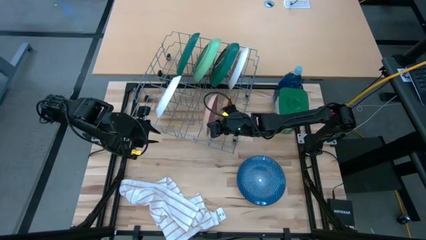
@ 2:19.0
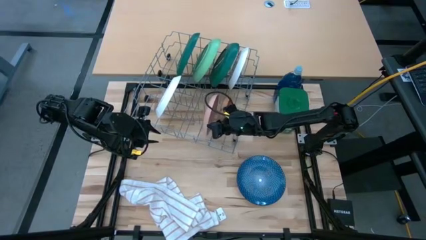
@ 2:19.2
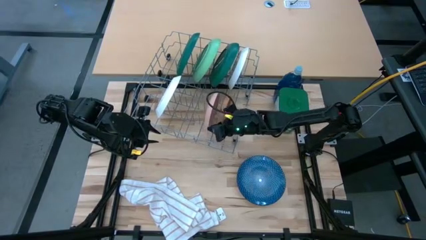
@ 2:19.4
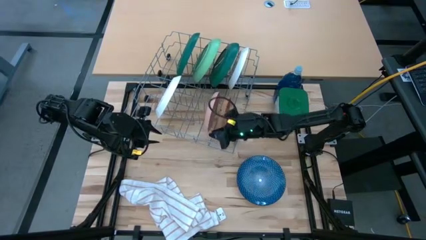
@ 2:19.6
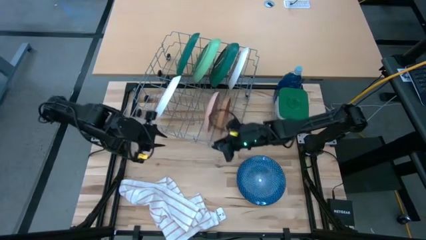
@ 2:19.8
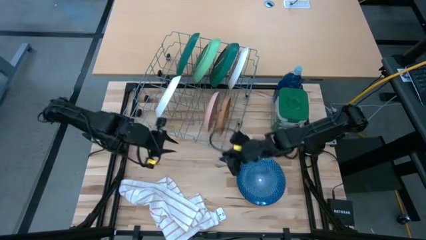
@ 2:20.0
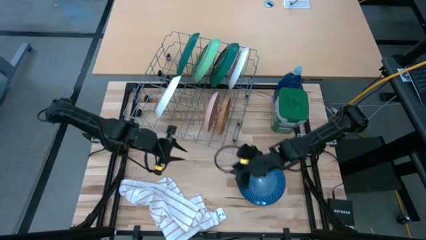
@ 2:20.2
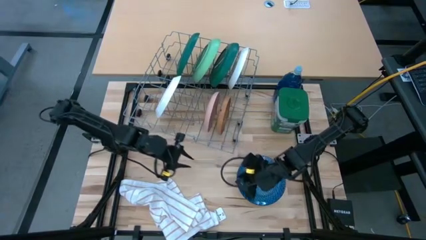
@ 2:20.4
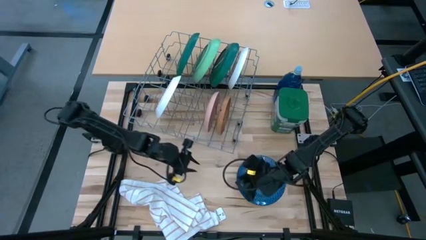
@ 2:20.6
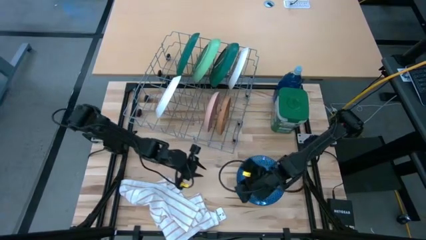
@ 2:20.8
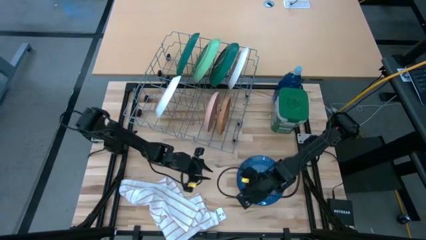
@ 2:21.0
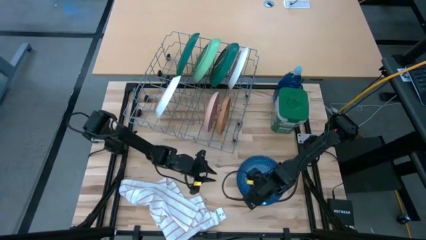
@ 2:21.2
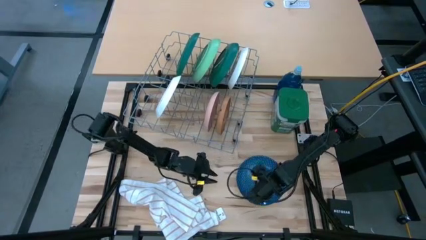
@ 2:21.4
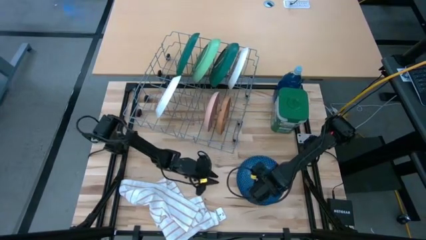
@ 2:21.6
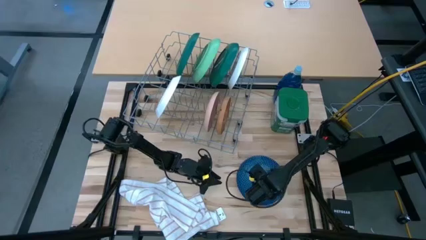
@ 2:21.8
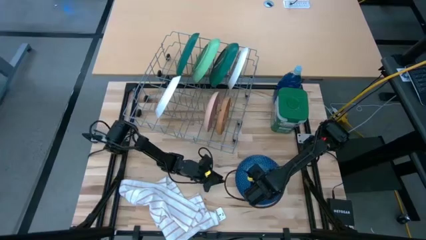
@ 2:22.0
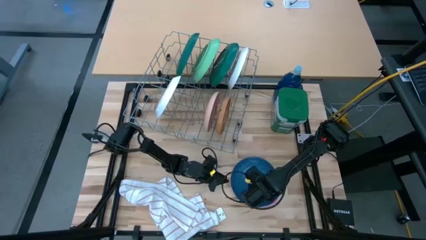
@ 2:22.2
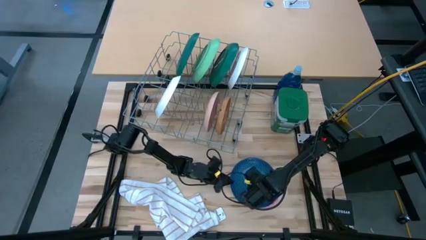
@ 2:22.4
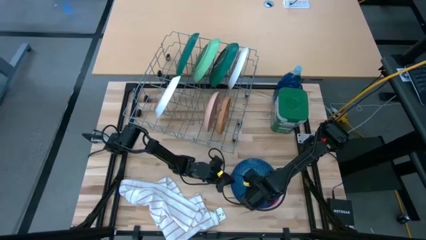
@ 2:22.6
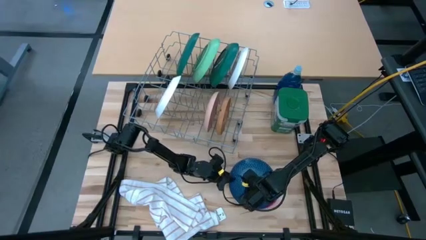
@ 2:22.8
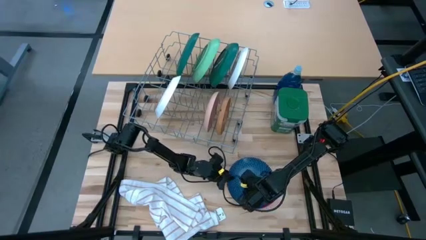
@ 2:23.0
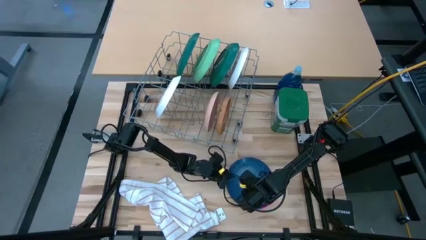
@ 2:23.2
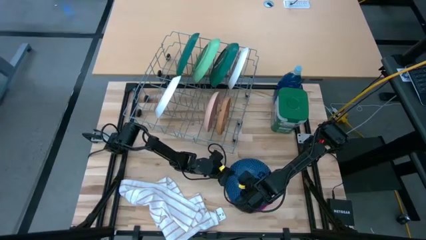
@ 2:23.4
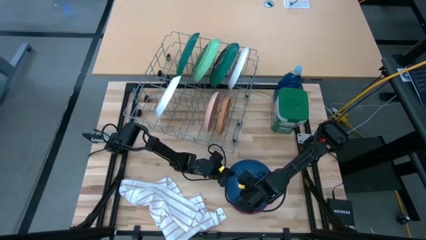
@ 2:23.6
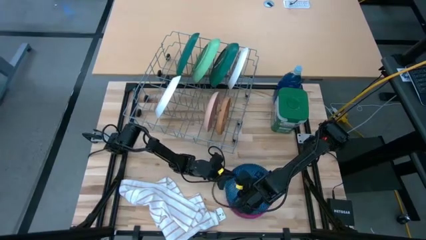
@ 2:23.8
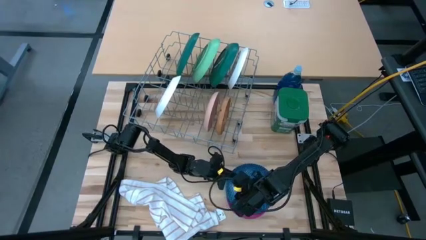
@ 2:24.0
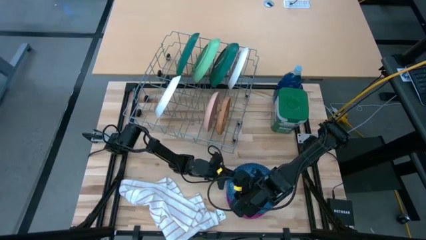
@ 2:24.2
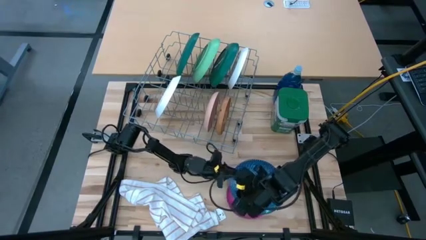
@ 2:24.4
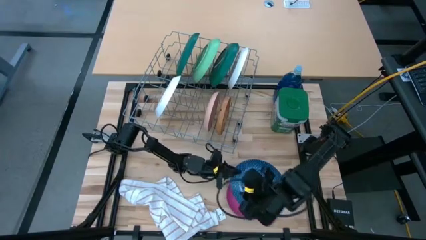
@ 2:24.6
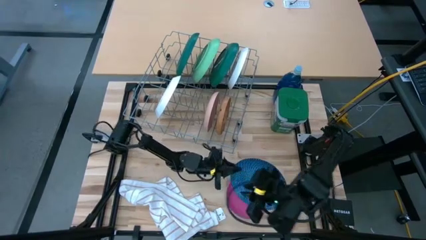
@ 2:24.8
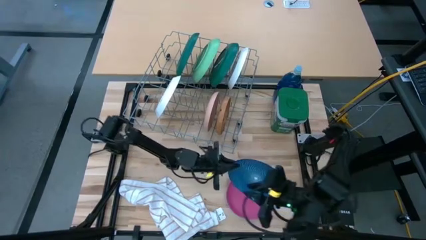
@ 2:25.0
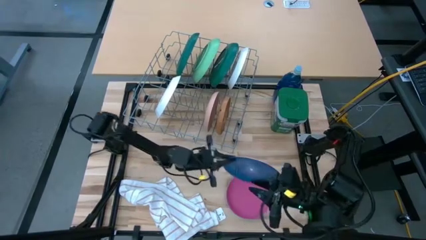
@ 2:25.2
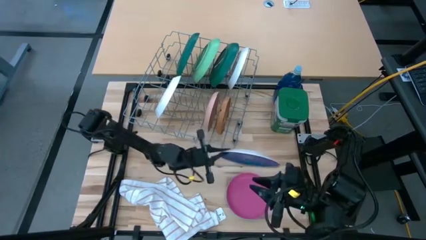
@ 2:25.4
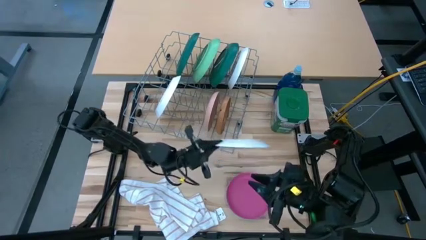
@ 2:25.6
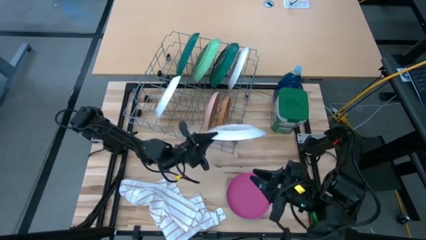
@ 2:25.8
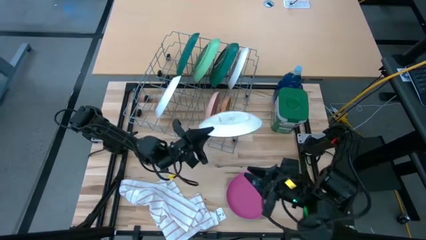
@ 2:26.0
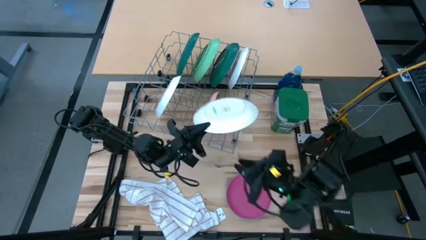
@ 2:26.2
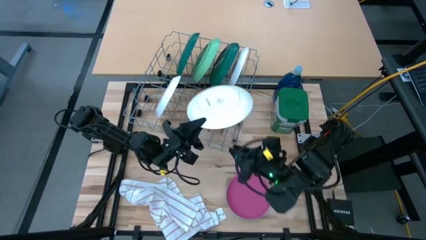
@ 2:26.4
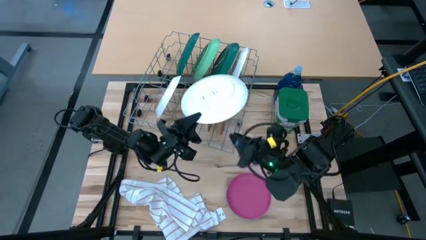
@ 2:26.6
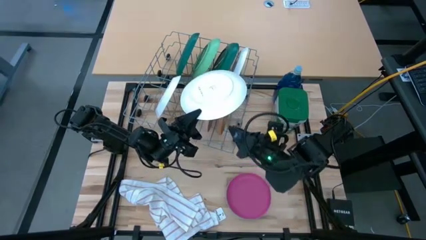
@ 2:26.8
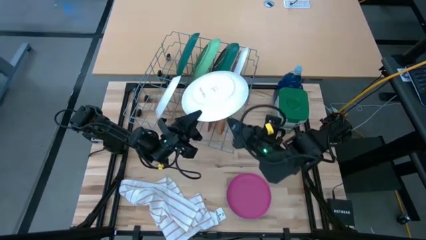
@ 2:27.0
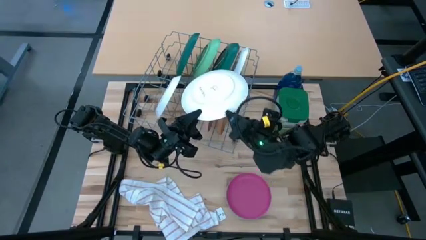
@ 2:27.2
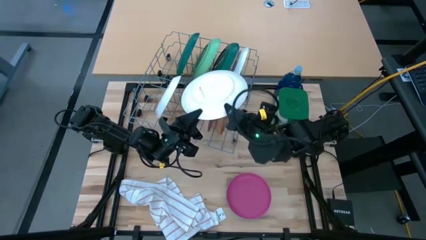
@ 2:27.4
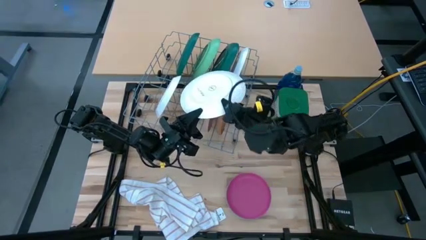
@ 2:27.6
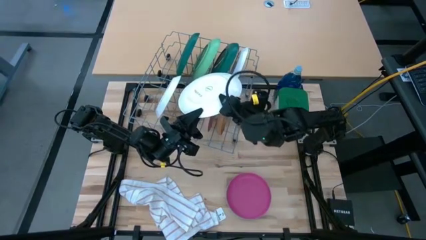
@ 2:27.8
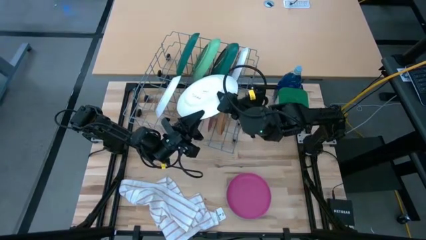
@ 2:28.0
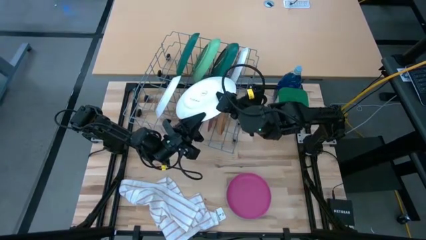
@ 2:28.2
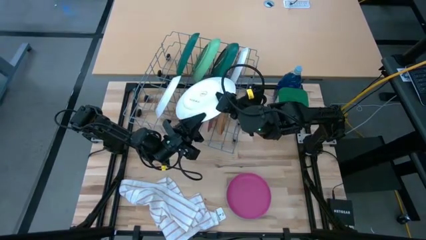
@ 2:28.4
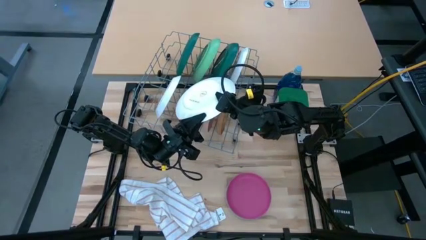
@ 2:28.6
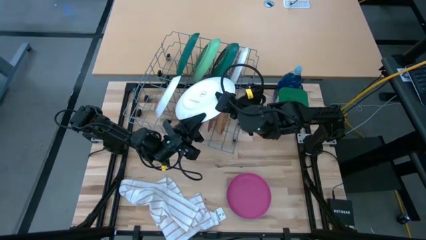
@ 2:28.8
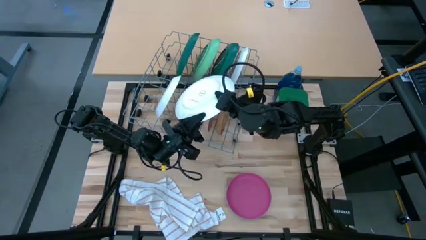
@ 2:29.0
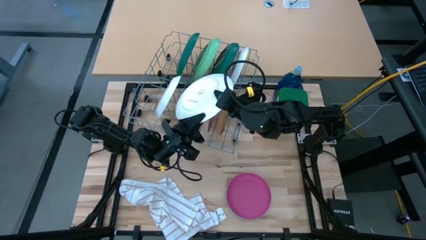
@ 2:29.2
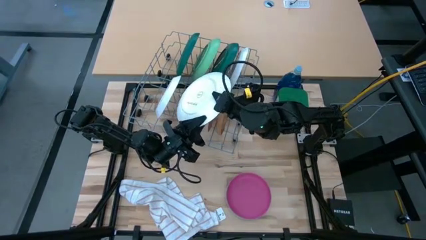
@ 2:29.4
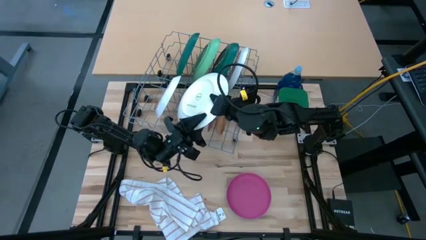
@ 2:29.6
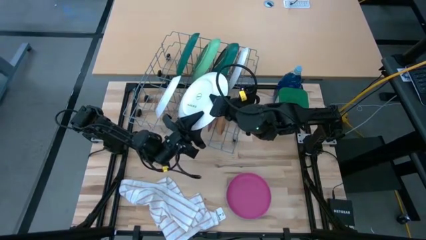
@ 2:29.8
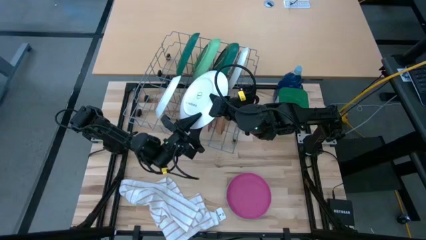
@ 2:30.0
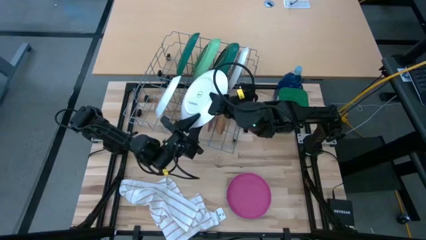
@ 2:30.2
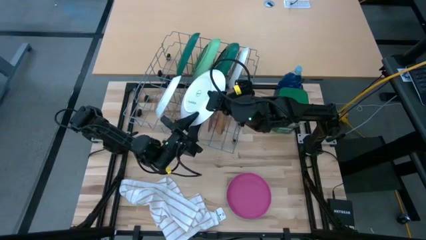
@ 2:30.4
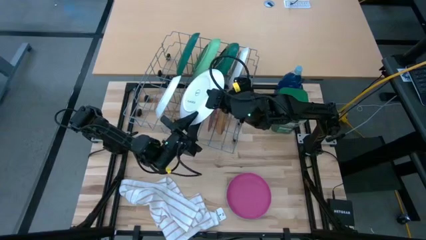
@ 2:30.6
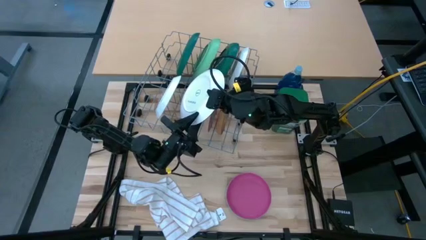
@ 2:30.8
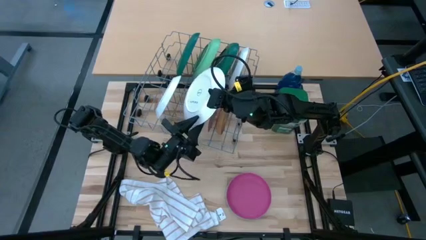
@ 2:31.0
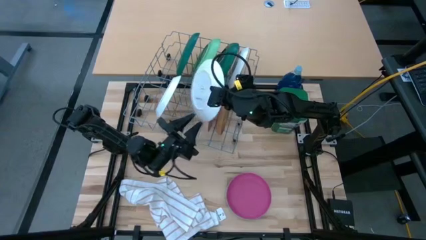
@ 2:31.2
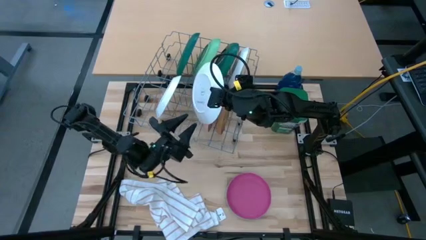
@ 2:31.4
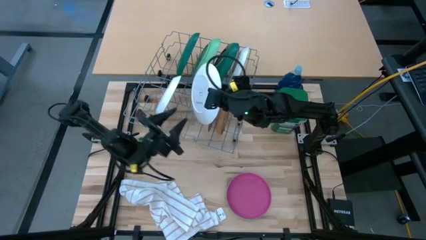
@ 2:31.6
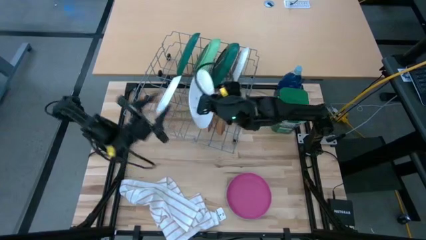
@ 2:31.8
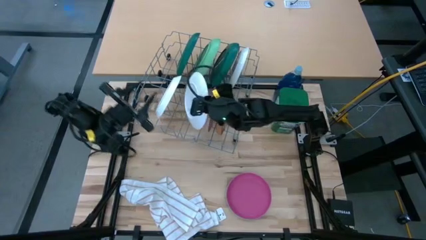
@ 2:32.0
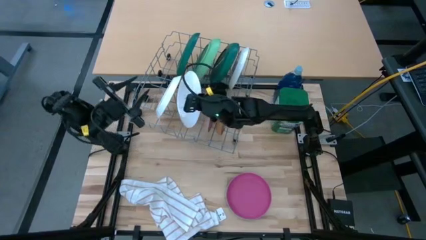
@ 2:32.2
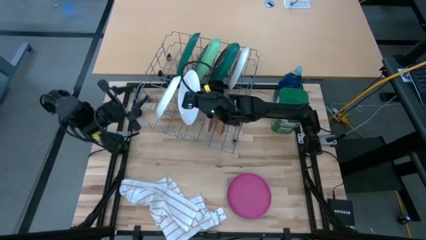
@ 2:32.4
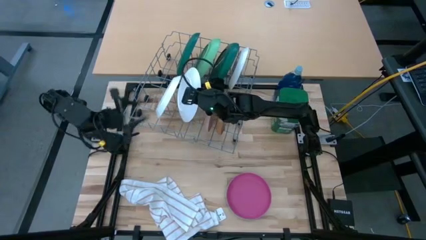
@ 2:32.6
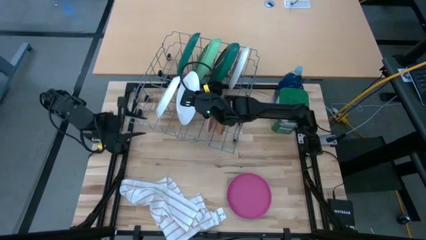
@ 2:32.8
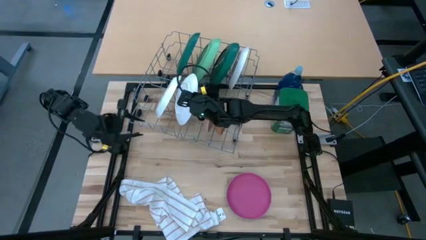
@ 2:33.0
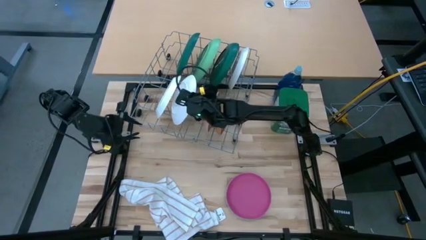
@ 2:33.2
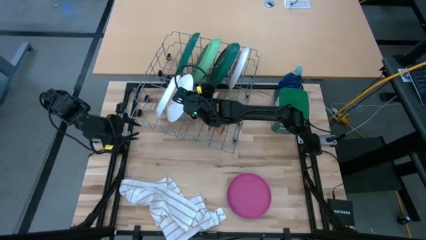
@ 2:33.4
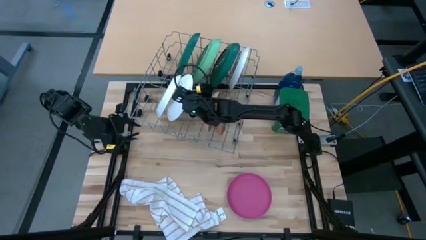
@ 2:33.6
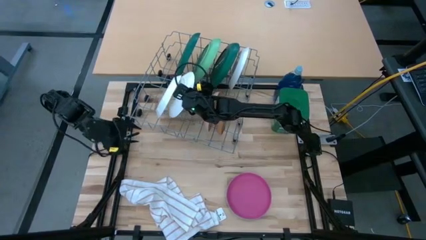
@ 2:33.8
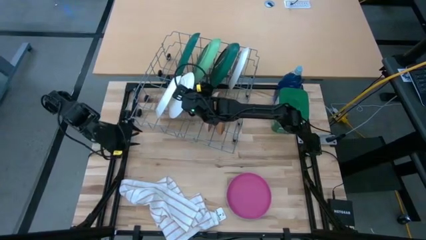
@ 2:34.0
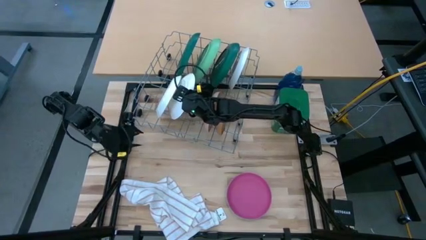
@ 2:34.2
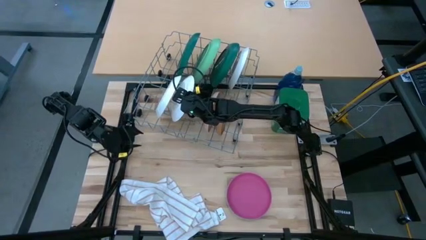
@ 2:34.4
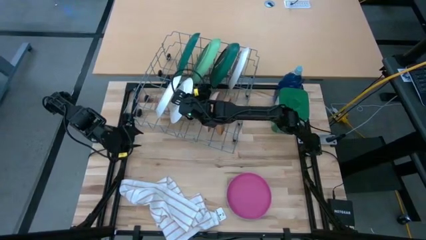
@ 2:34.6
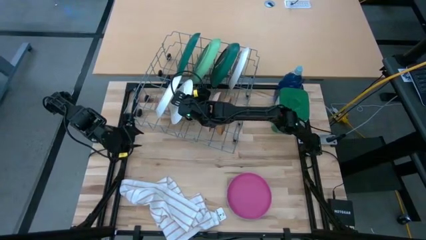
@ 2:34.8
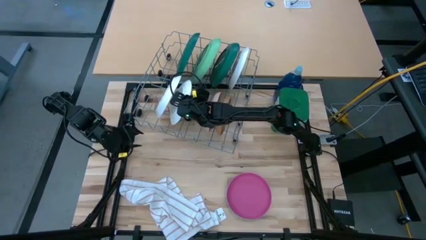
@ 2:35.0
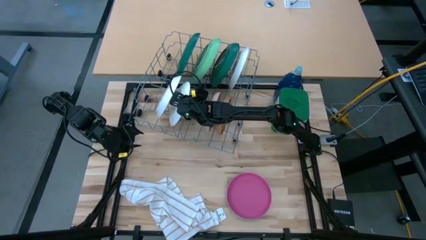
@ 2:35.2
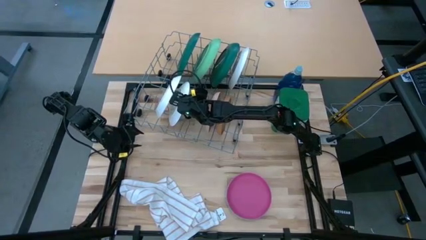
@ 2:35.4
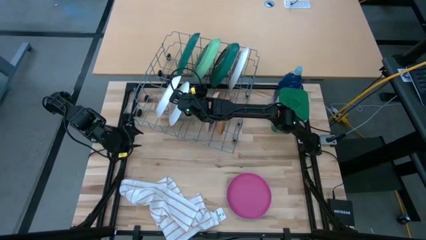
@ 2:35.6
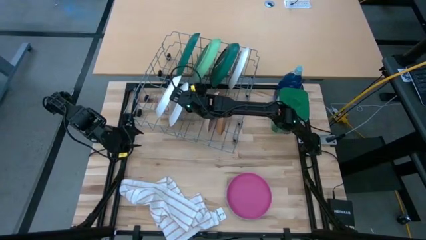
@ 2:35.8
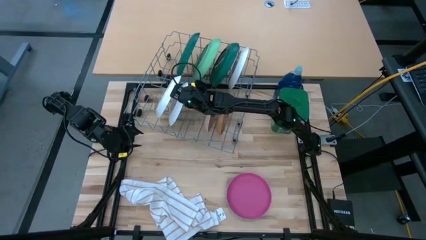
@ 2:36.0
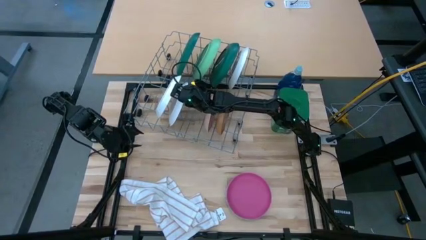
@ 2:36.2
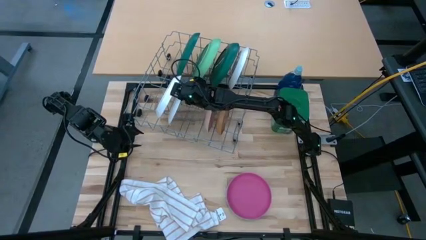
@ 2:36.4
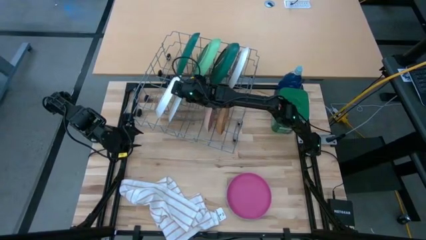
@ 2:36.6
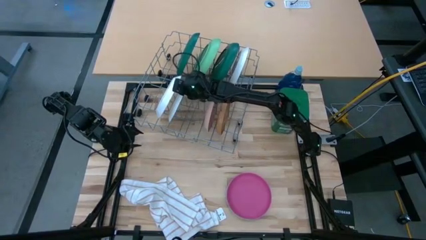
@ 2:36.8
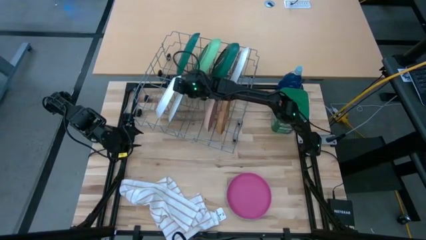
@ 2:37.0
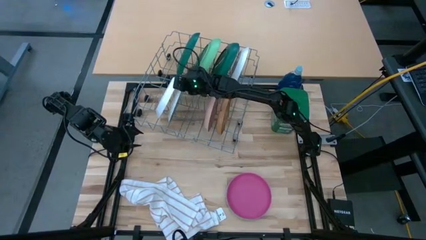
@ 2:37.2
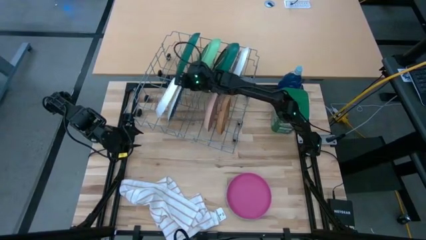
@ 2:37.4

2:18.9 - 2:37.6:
Task: Sort dishes
Put the blue plate in the dish rack
